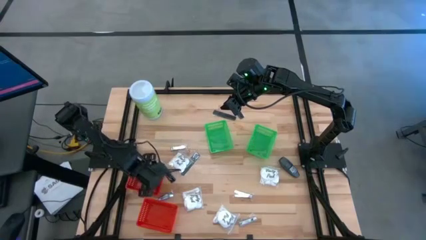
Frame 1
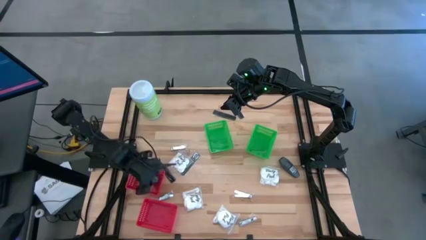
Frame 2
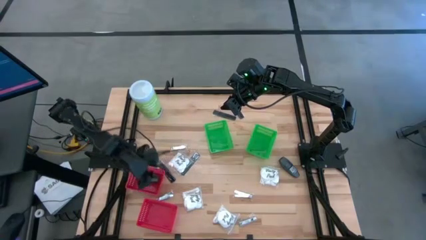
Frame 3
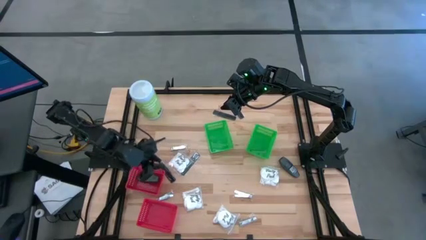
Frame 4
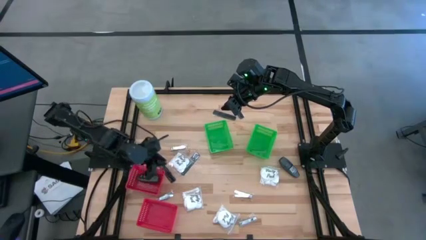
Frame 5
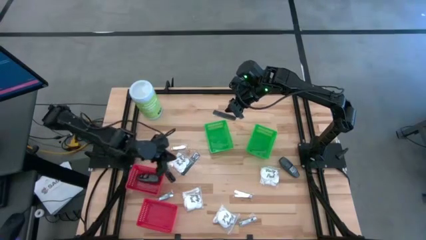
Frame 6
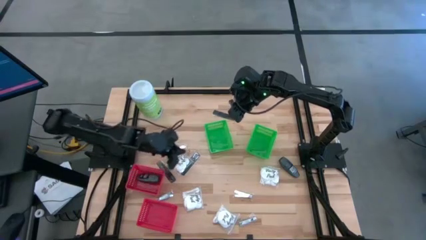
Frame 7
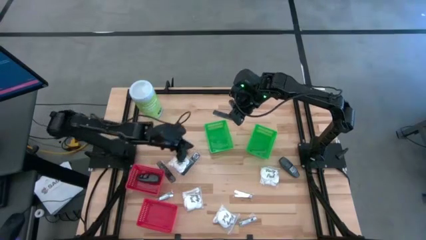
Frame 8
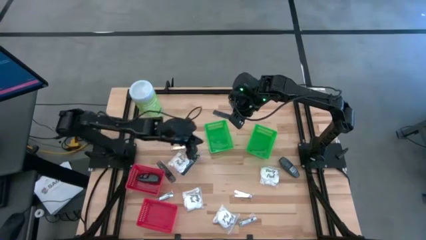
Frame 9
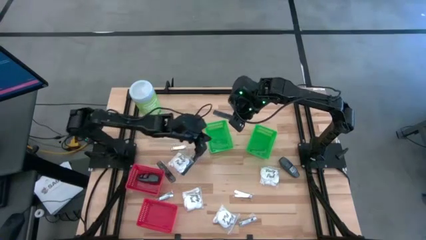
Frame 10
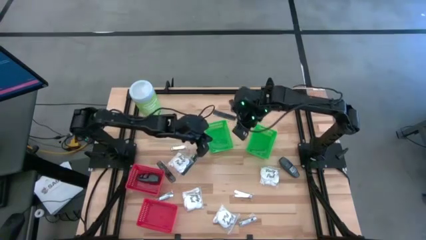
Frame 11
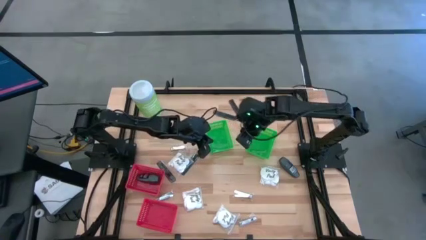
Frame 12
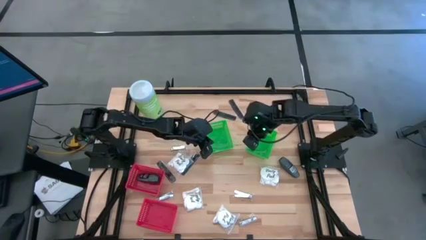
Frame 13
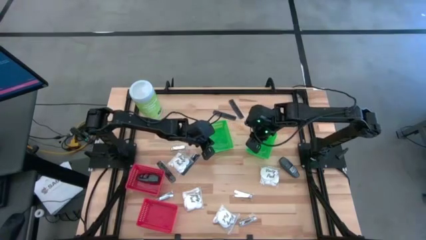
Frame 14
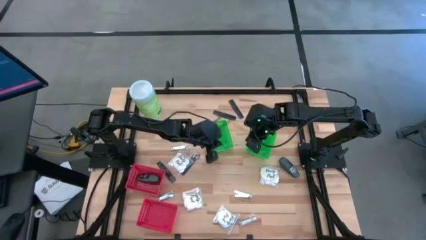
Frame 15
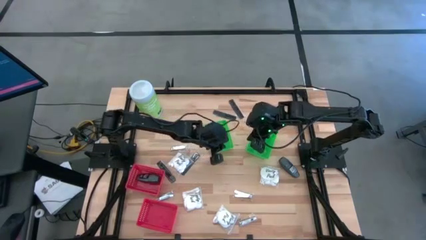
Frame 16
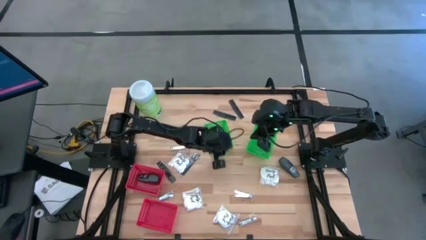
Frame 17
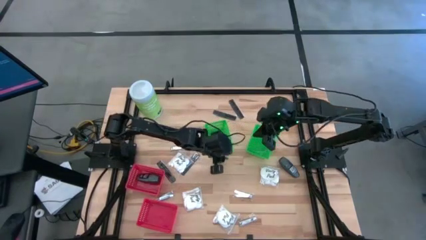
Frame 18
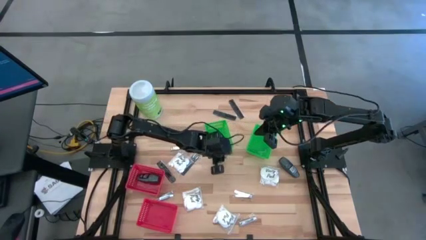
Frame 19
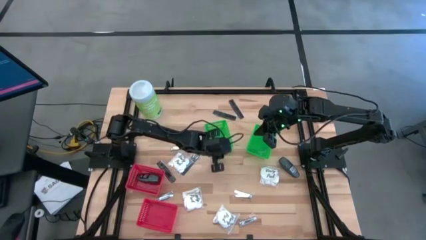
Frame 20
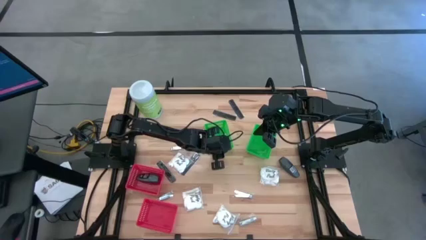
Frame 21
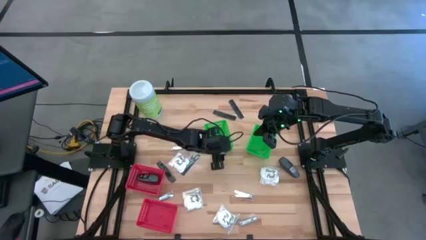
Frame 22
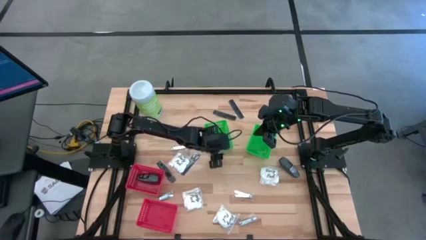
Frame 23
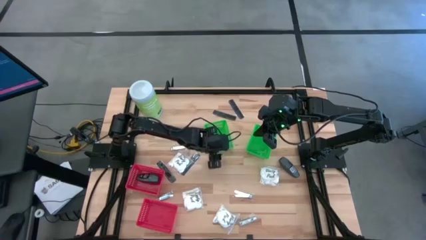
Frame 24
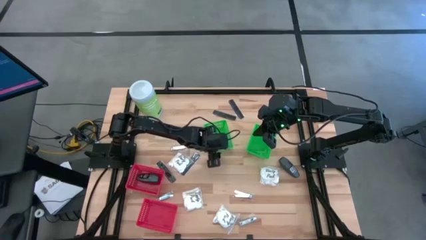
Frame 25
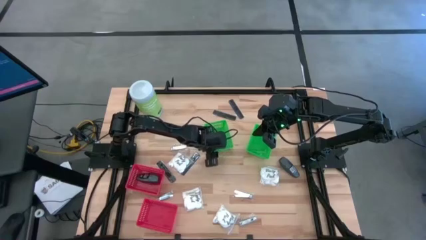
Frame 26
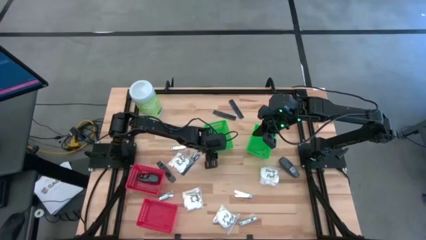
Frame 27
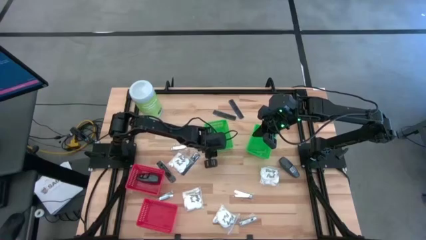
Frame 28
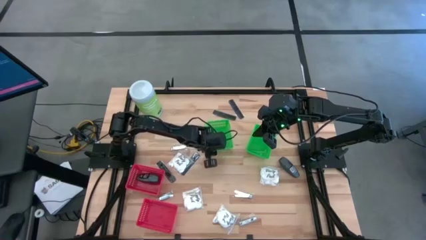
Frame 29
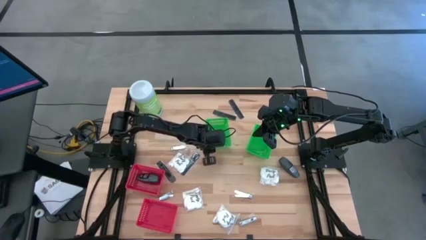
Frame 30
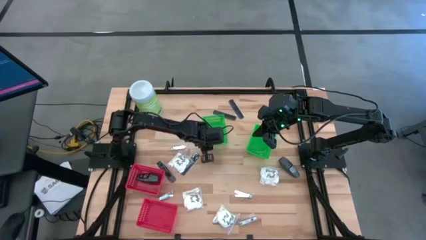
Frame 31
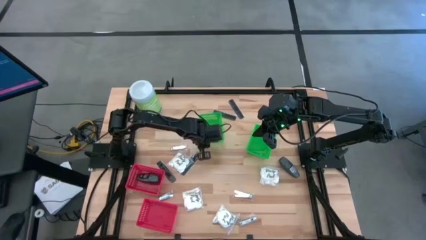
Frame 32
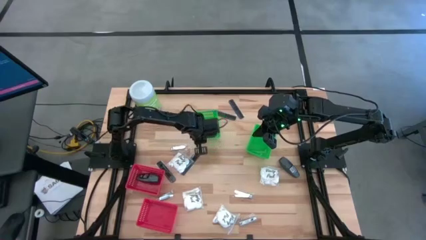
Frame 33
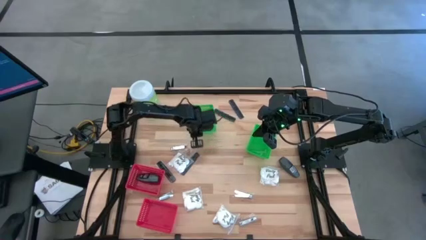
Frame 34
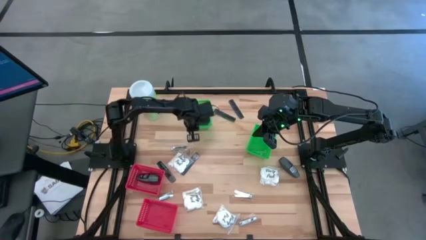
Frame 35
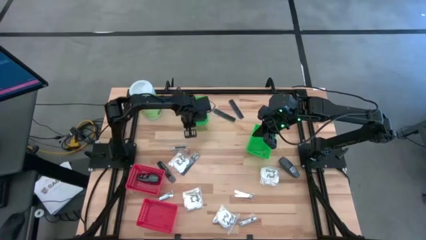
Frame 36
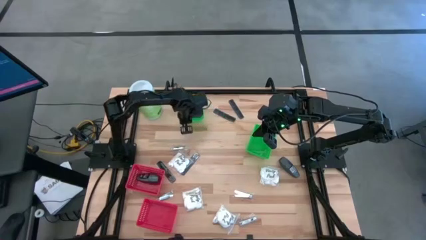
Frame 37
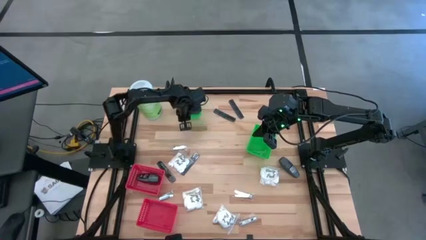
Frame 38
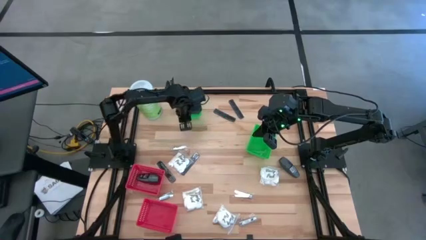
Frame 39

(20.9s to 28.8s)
Task: Pick & Place Travel size toiletries
Move the left green basket to the top left of the table

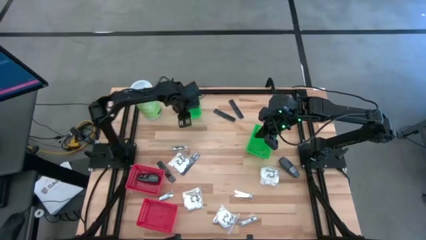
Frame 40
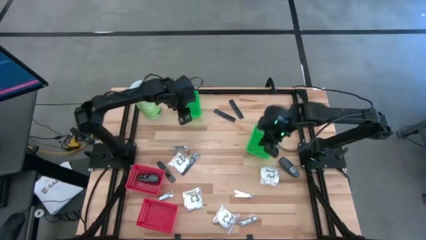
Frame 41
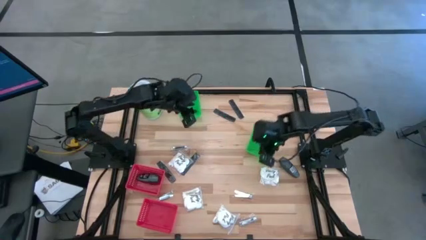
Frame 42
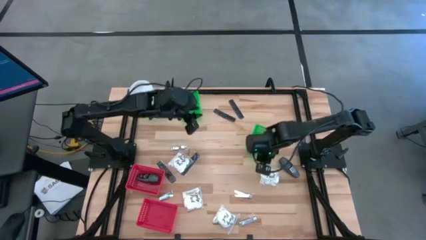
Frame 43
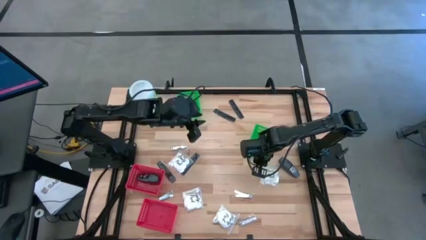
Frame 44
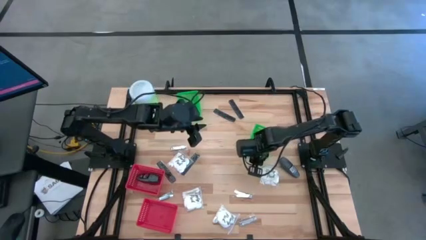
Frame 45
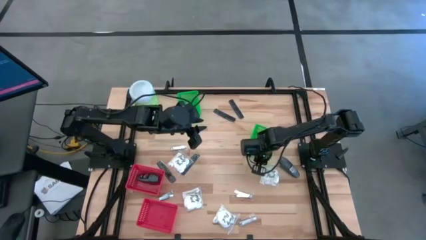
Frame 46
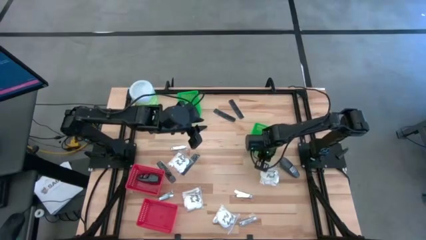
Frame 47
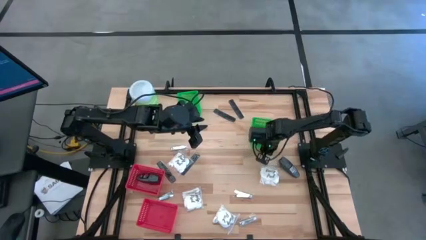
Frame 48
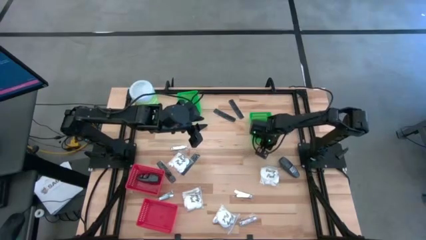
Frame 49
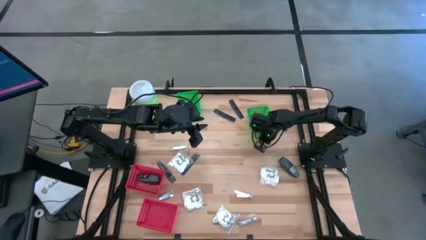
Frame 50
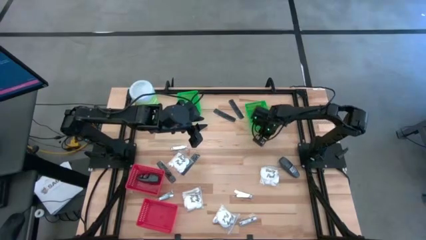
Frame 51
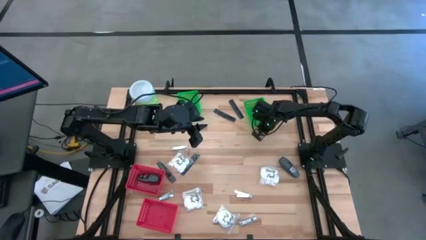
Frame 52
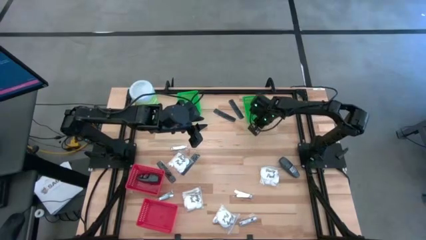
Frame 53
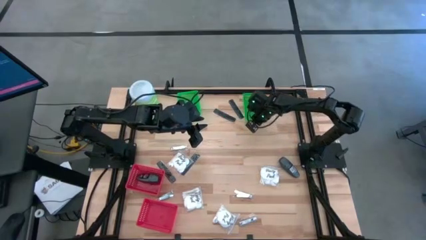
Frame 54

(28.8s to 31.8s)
Move the right green basket to the top right of the table

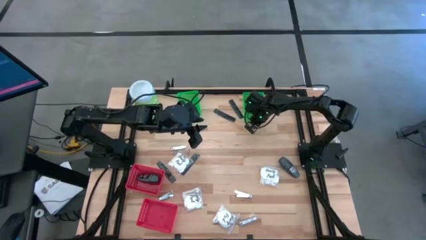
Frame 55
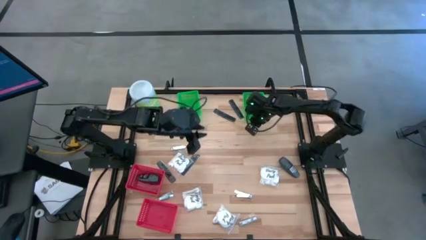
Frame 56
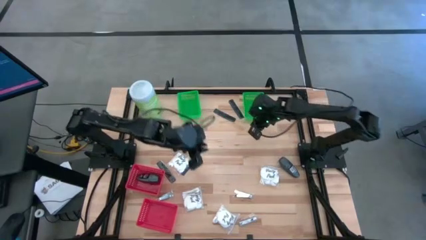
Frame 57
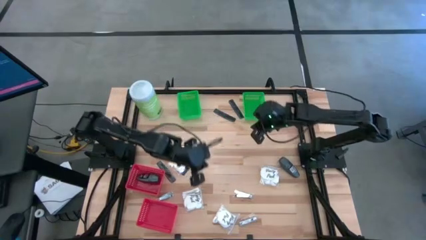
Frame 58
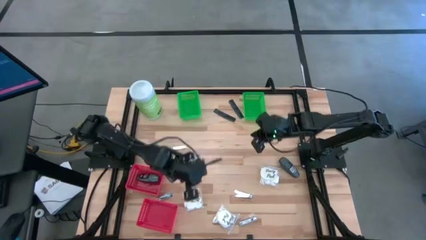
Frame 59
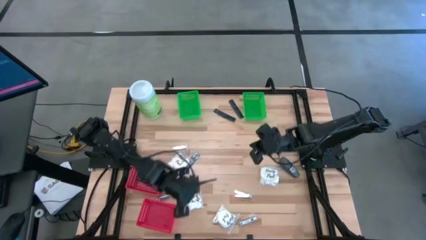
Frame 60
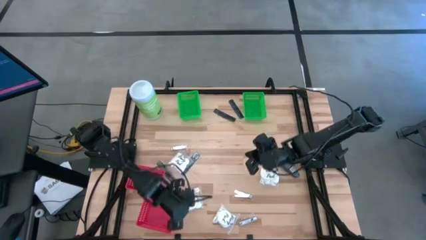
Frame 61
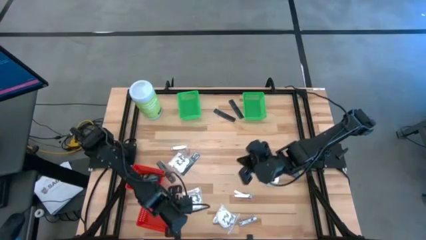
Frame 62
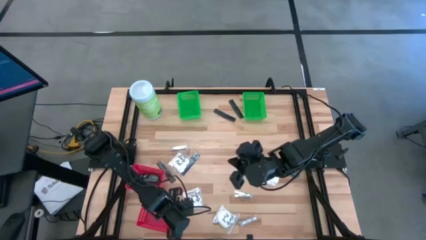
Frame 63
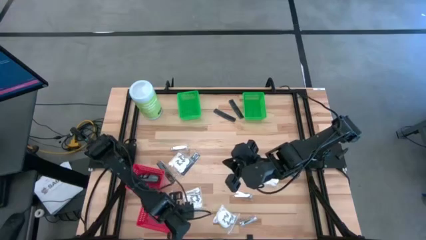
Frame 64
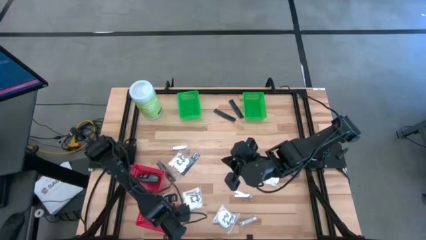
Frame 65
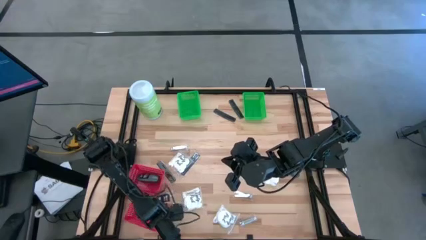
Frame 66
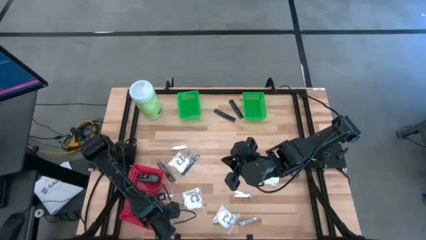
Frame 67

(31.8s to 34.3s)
Adjust the bottom red basket

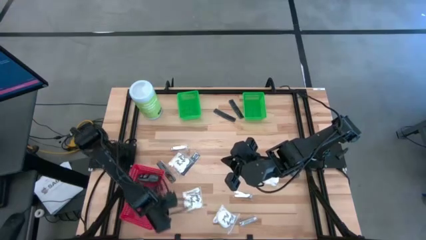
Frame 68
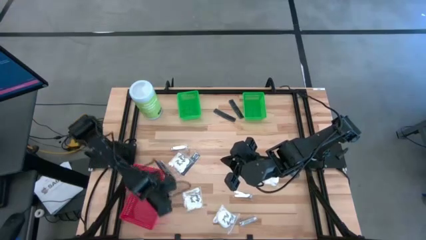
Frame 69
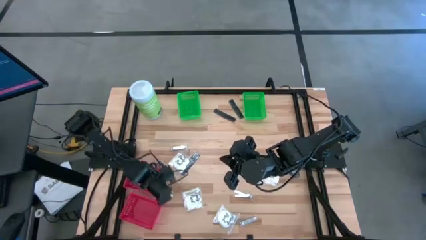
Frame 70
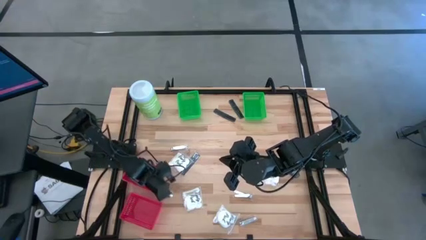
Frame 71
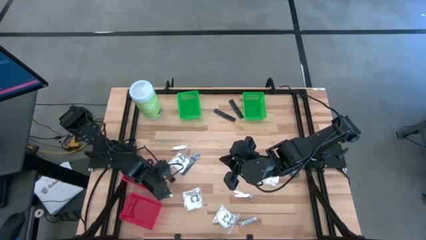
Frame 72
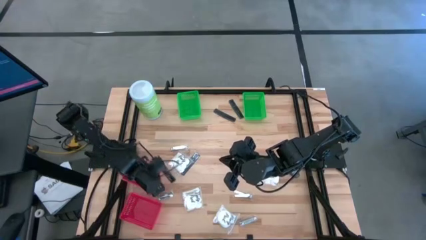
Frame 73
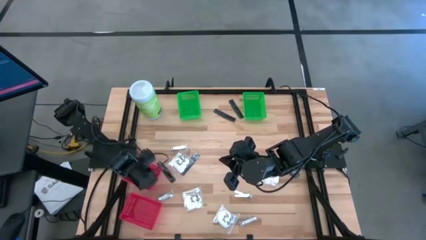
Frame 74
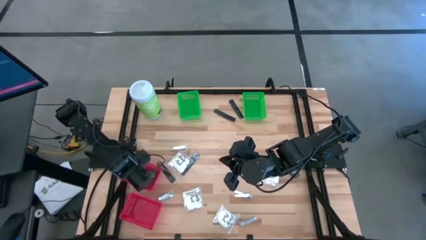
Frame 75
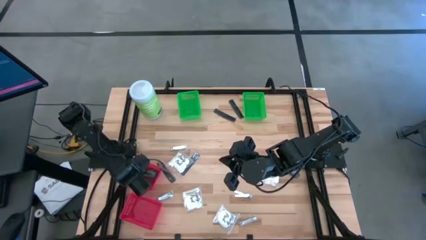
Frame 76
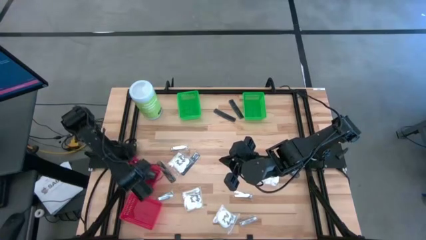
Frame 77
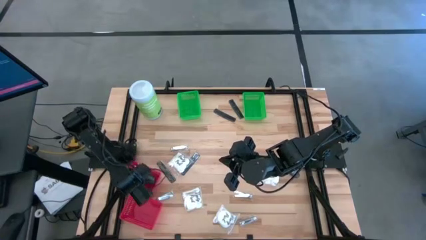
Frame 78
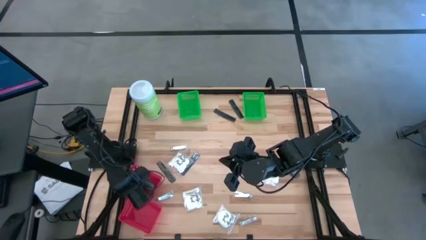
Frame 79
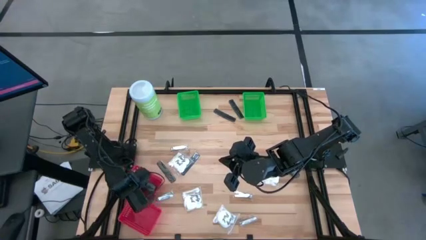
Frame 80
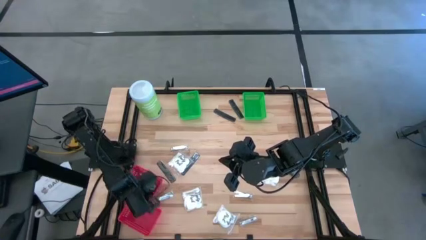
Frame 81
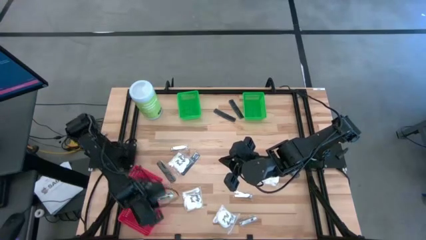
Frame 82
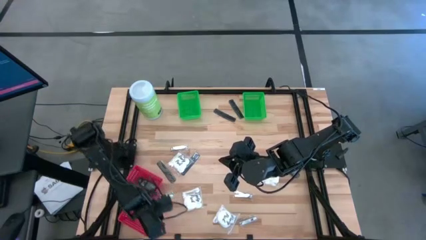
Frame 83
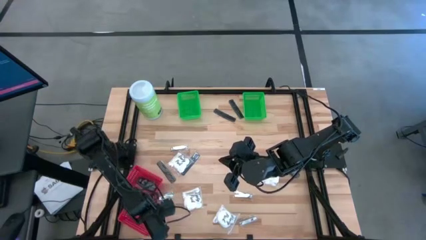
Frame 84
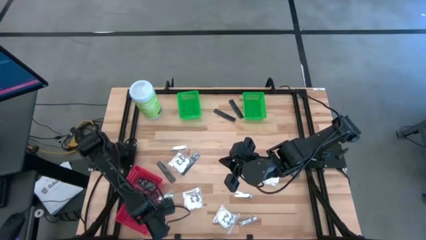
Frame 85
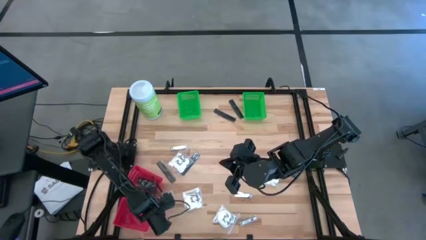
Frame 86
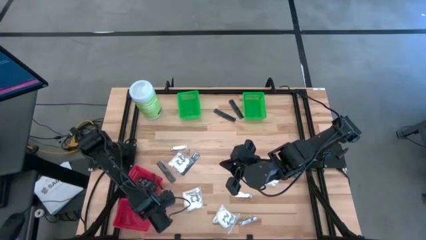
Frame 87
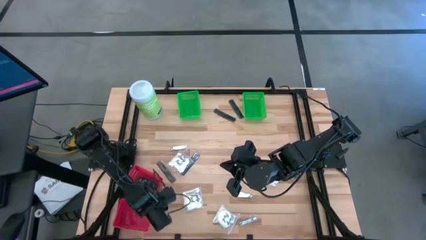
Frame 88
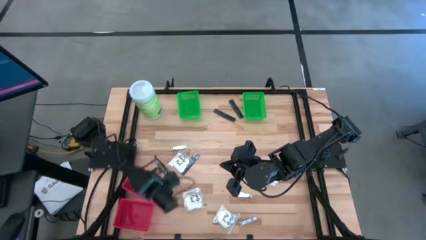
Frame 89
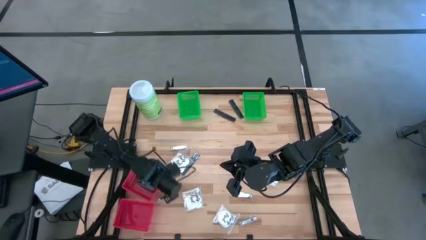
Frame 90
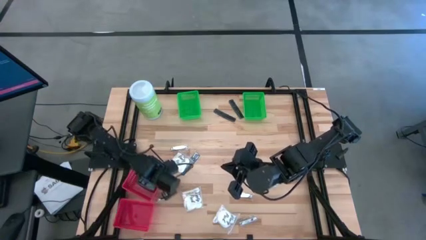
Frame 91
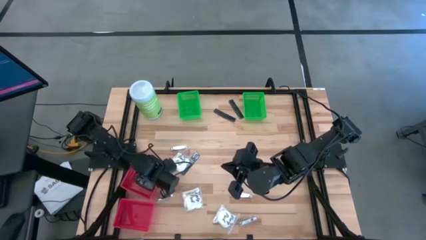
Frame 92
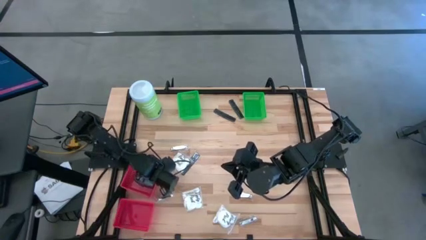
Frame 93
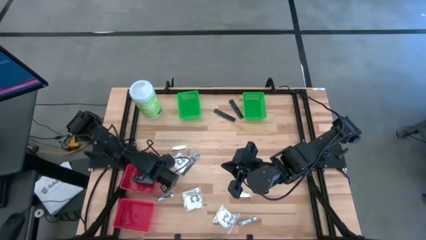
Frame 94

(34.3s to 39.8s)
Adjust the top red basket
